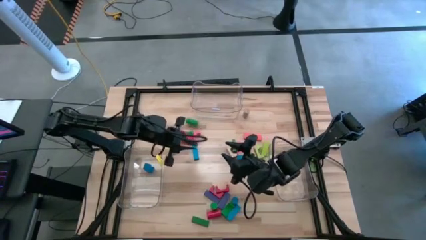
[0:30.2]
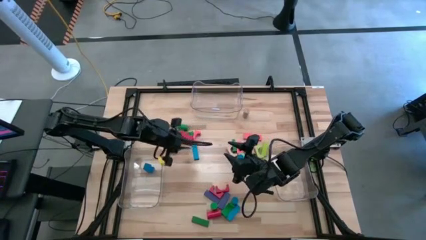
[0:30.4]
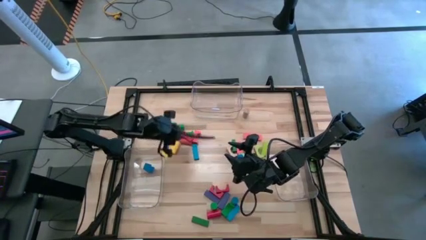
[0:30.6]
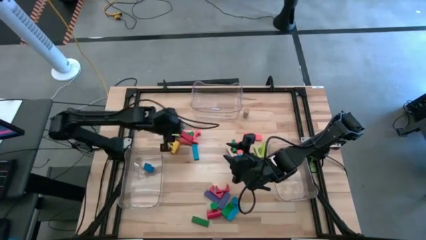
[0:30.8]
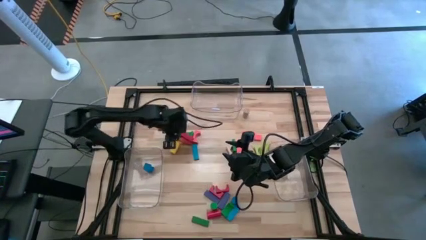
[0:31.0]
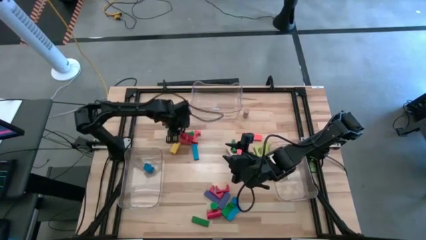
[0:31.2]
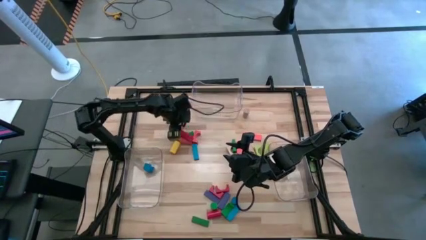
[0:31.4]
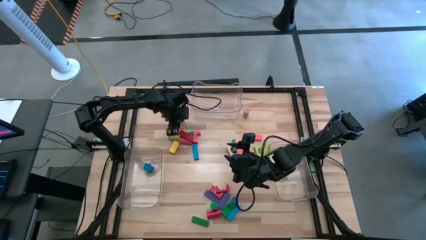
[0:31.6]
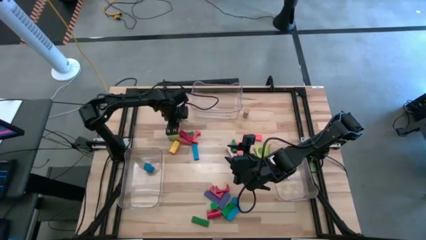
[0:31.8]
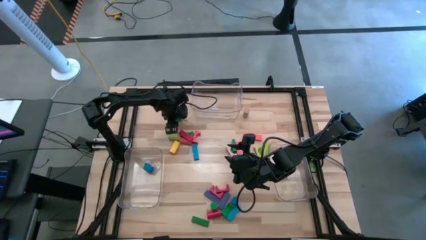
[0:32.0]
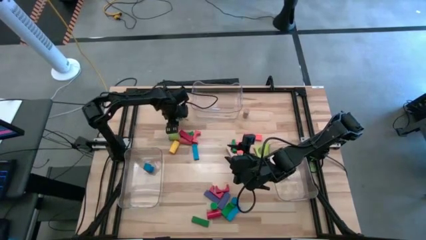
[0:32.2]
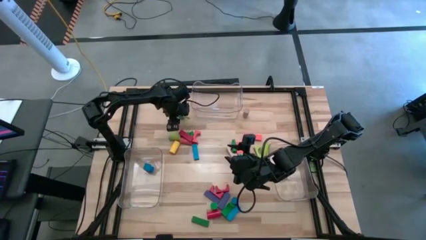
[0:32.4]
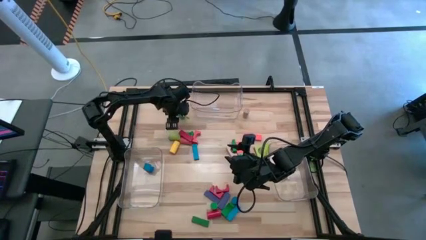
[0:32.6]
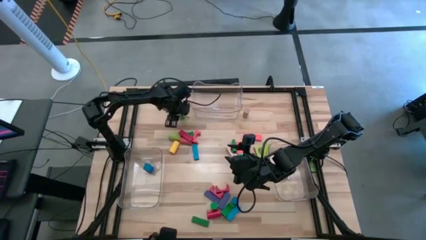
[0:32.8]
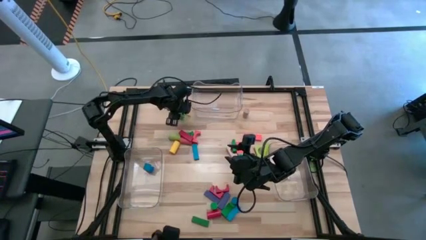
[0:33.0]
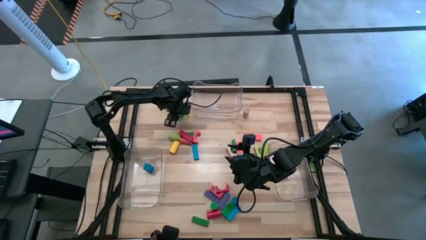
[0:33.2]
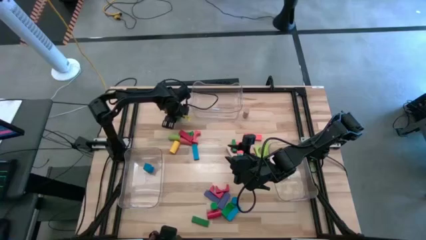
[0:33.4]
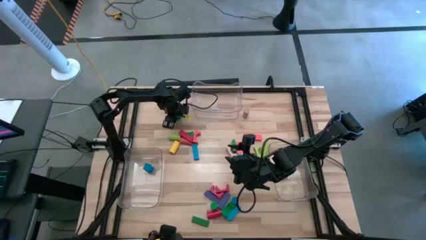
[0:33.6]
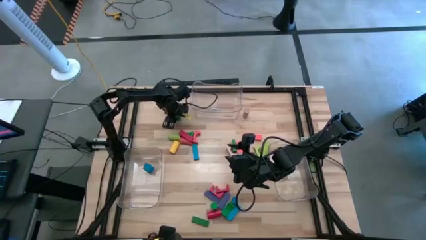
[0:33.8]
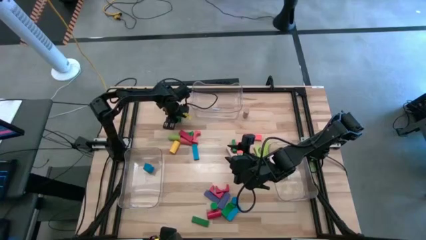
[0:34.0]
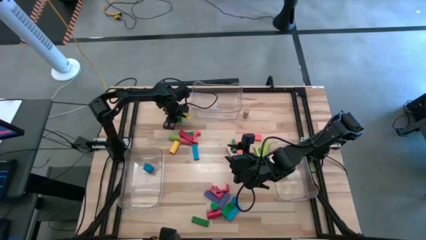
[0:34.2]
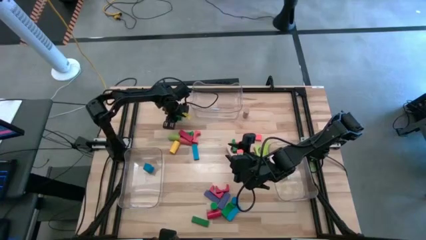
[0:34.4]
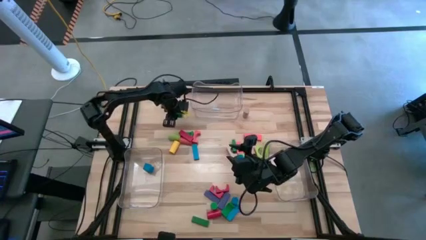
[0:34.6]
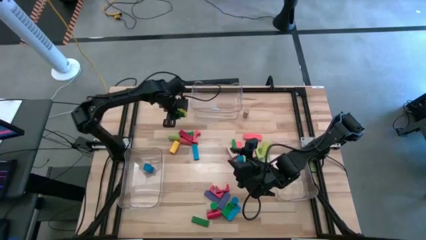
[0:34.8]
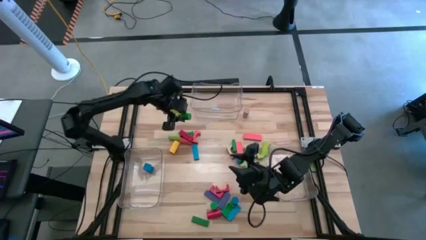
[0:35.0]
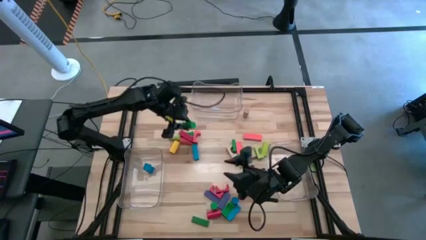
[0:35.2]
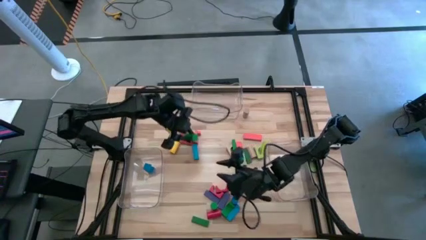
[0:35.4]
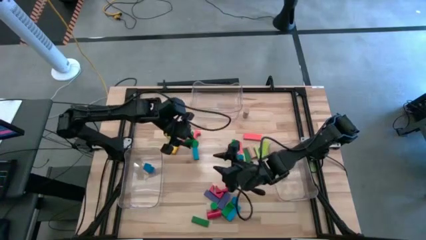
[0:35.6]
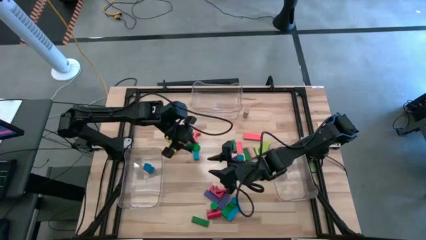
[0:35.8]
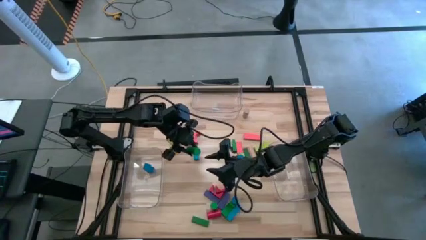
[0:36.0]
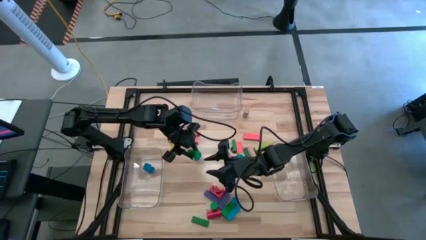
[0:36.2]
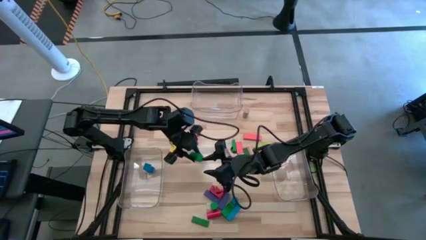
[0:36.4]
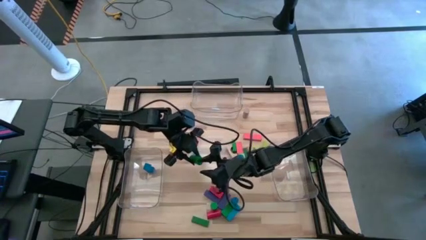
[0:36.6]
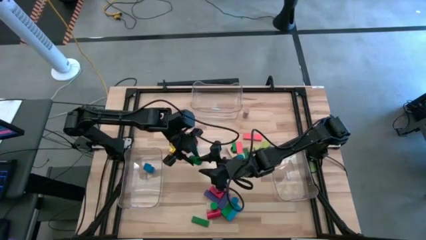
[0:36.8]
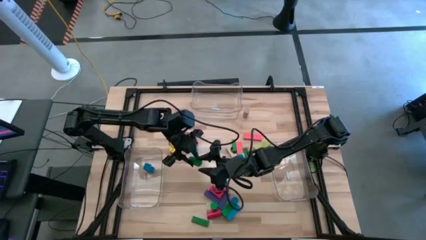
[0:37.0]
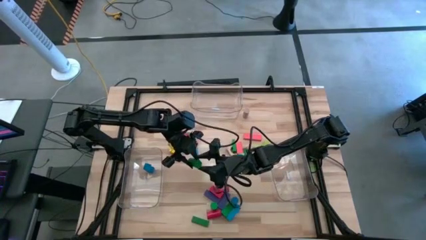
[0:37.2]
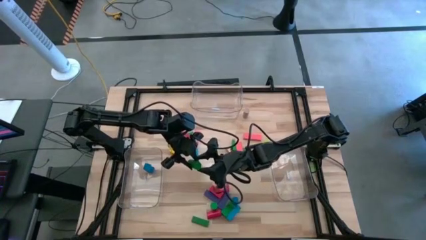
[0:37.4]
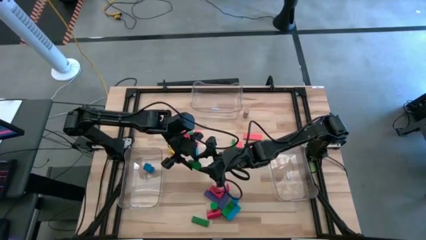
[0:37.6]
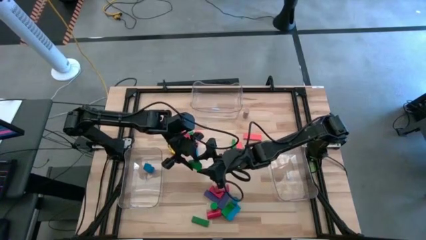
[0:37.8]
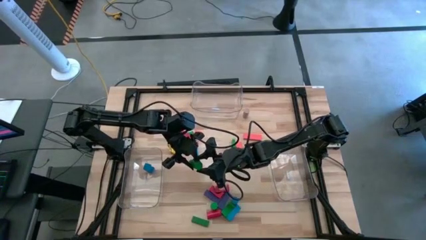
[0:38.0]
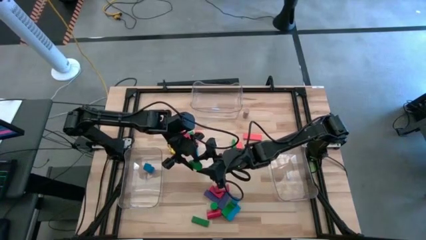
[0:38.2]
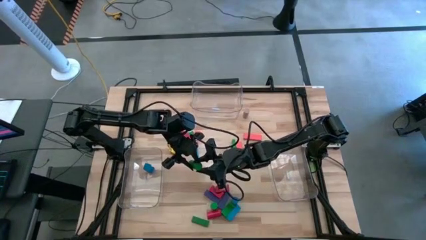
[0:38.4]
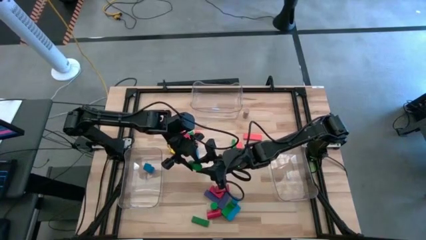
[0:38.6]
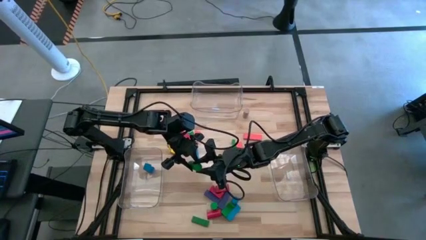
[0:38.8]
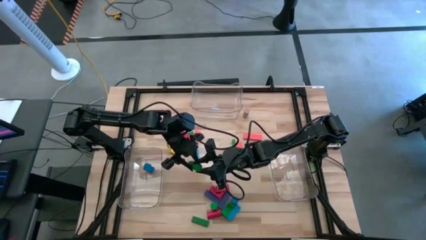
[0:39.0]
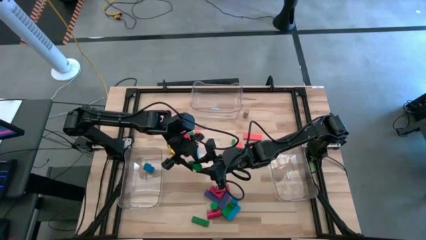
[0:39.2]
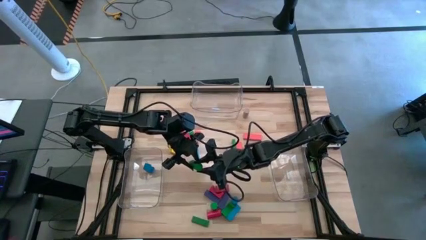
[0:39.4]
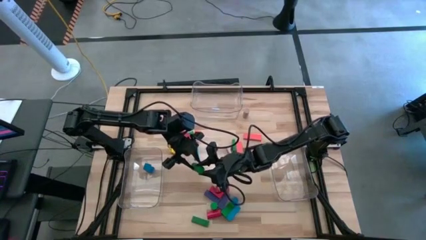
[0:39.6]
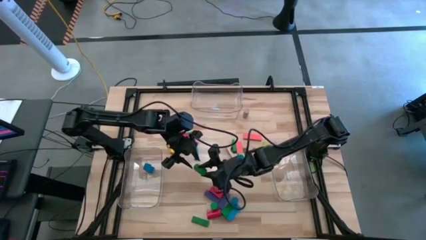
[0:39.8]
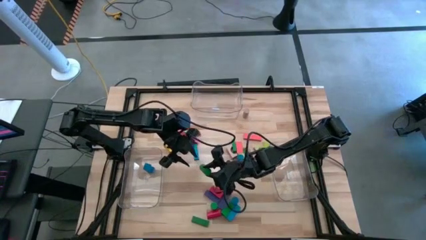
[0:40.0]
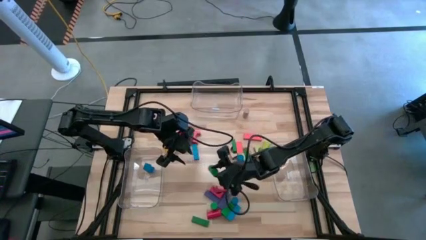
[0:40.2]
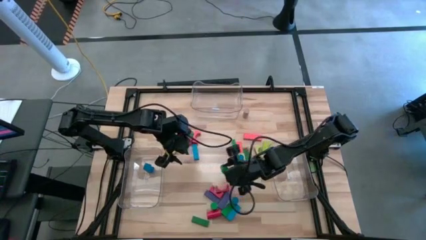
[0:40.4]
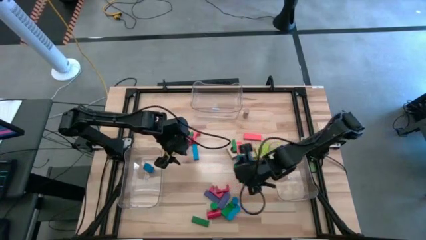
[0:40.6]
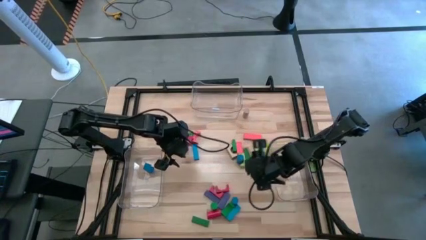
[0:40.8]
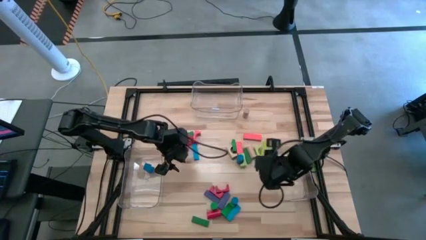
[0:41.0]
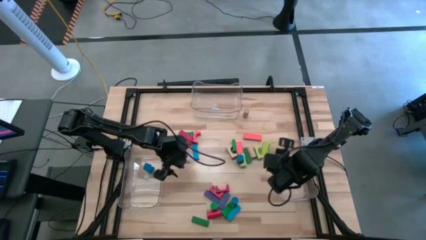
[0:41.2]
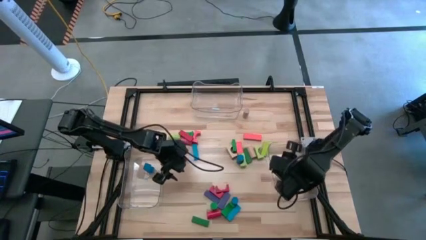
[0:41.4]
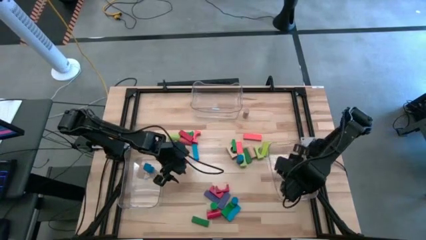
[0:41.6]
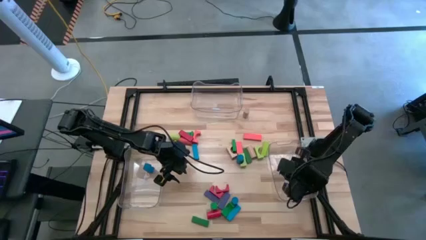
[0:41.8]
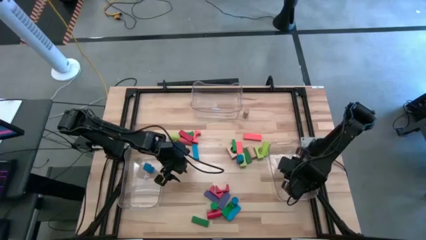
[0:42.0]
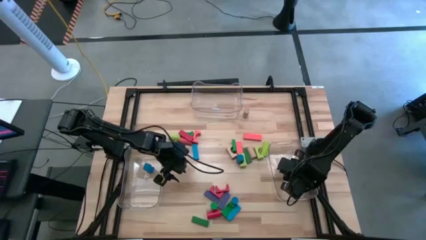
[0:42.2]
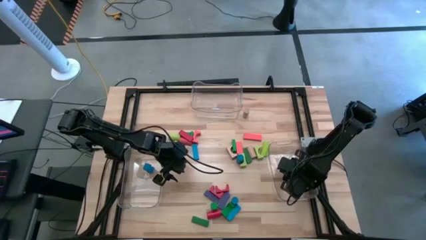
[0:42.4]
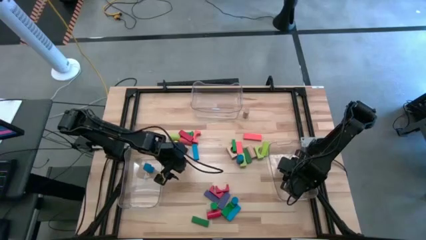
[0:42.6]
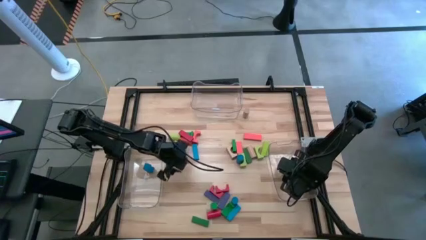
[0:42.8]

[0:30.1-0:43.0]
Task: Sort blocks by size
Put the green cylindrical block into the right transparent bin
